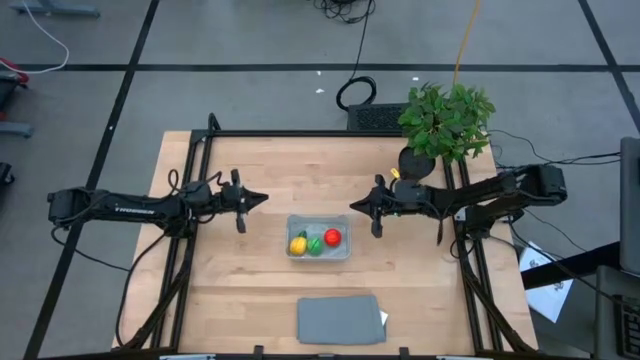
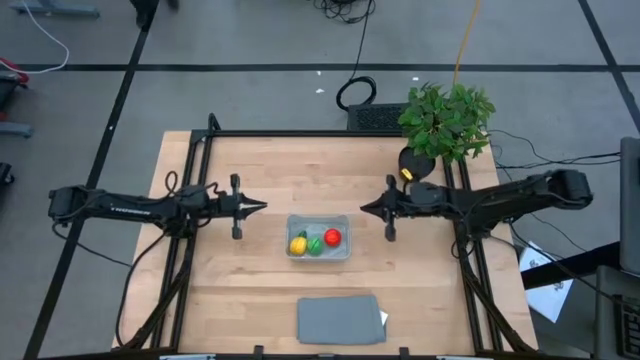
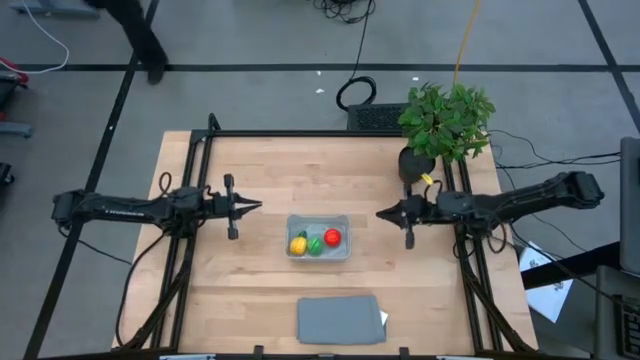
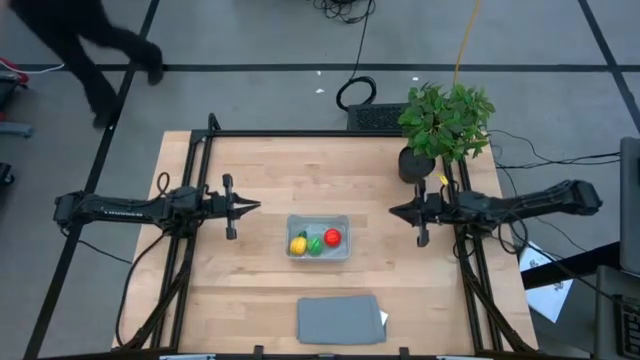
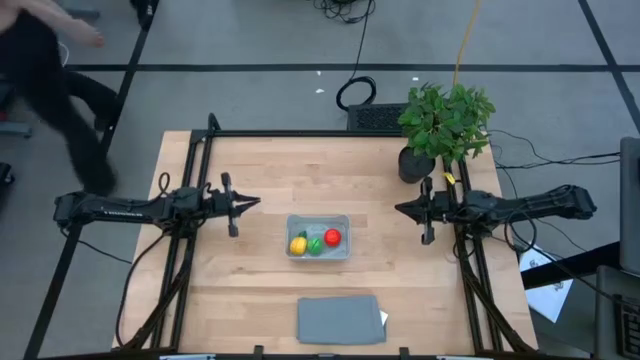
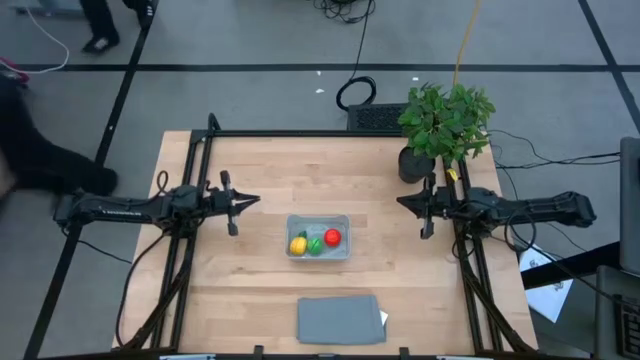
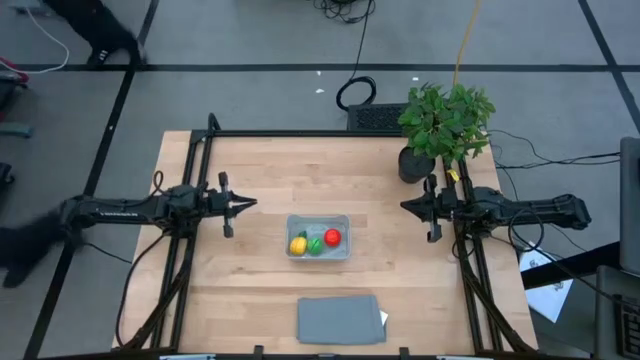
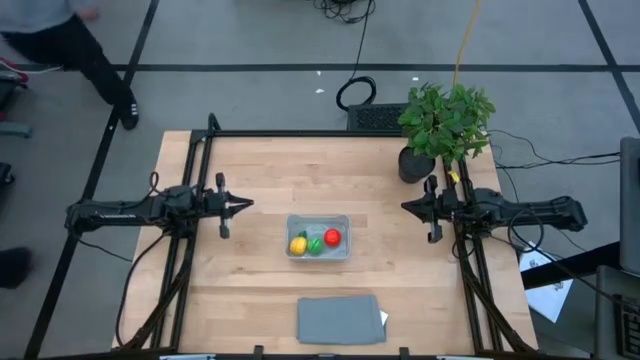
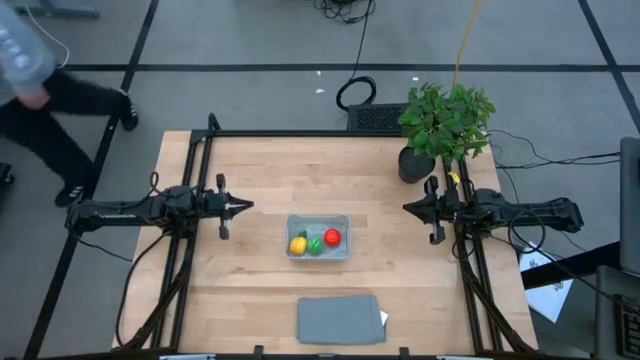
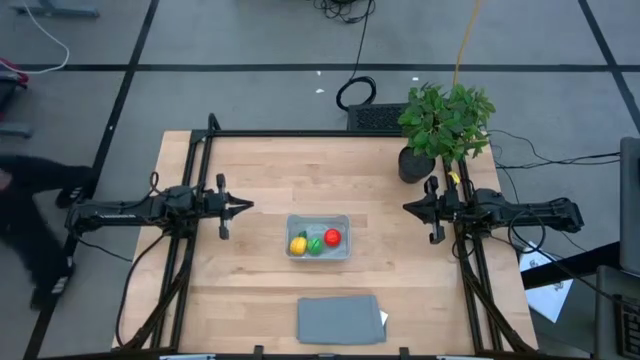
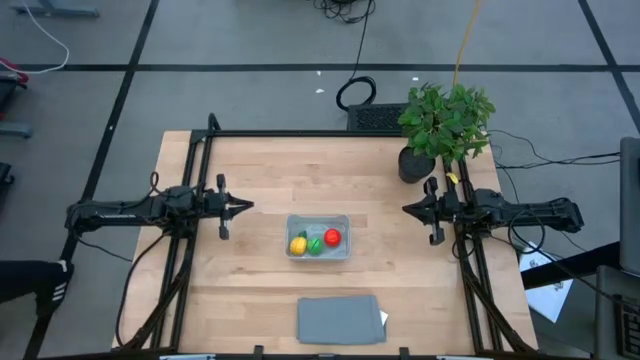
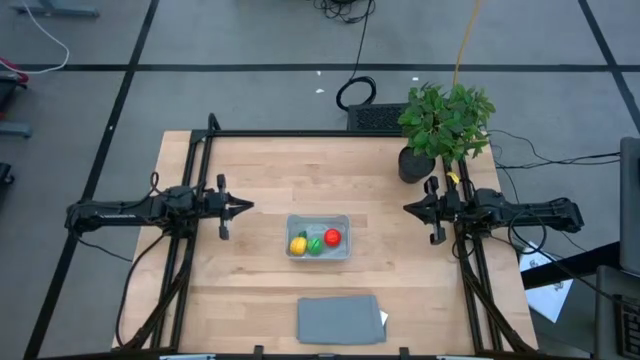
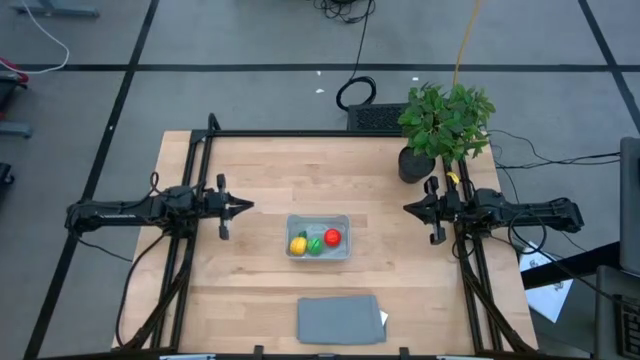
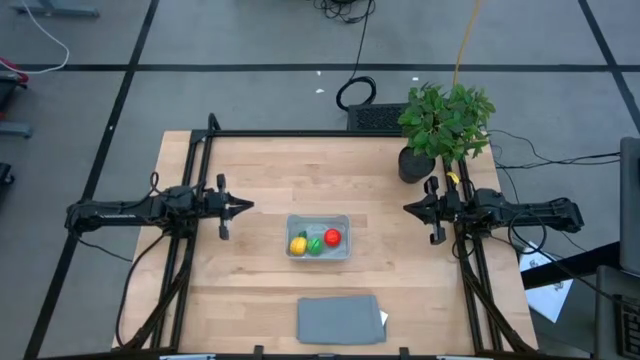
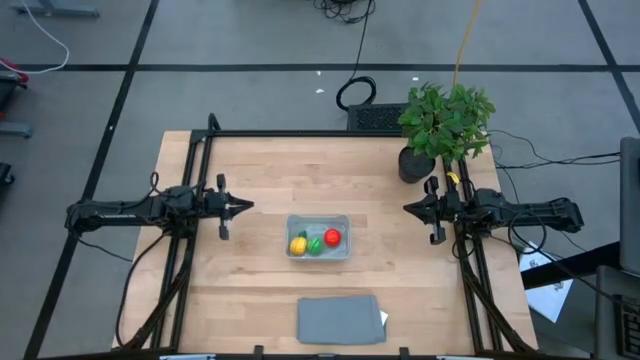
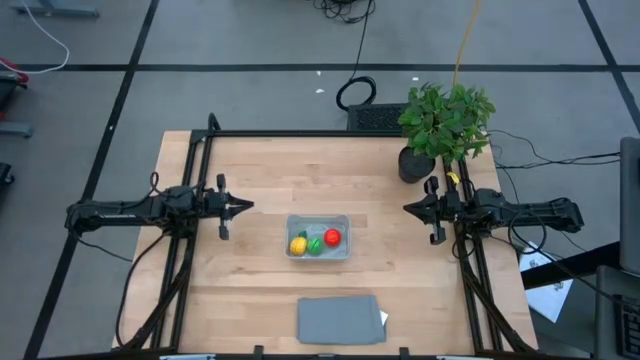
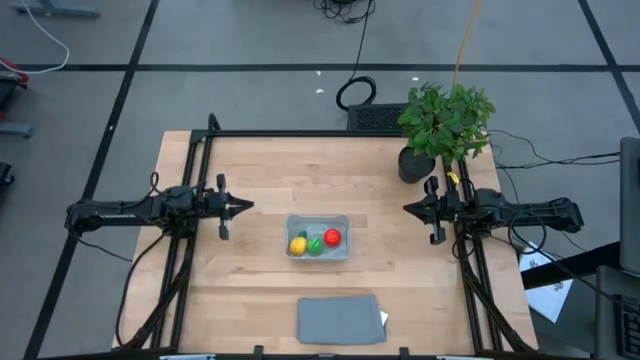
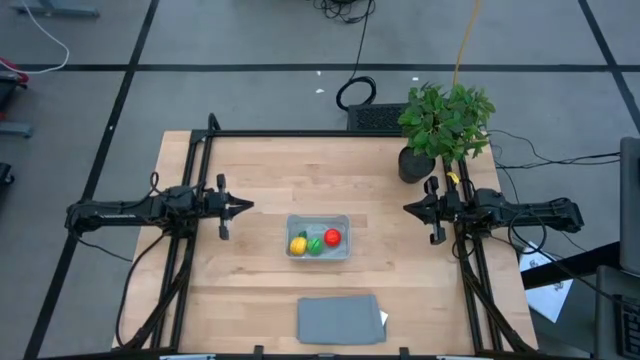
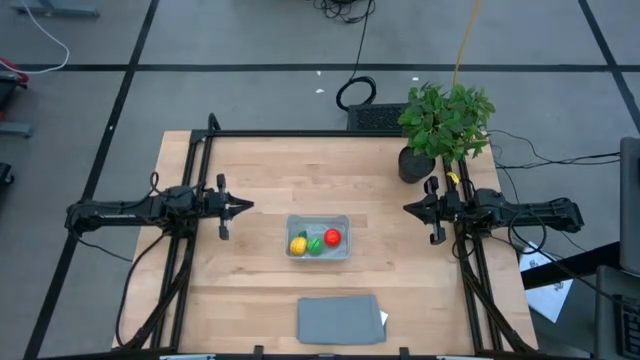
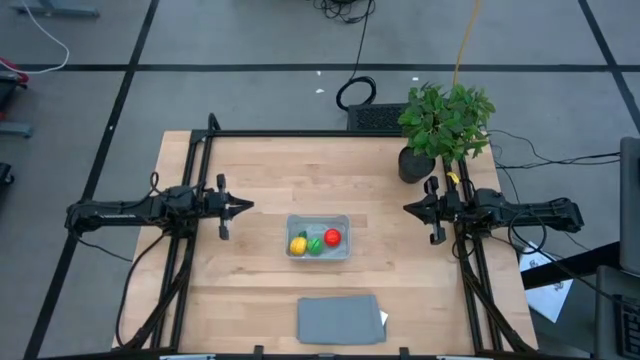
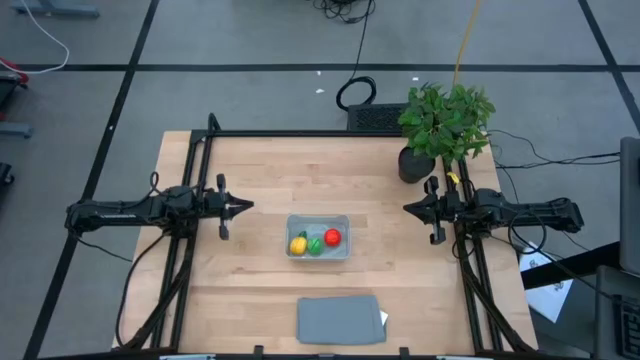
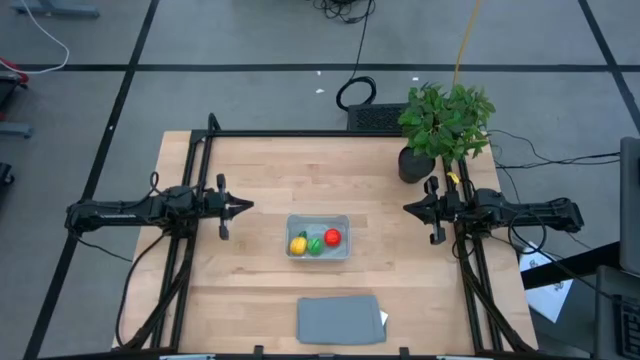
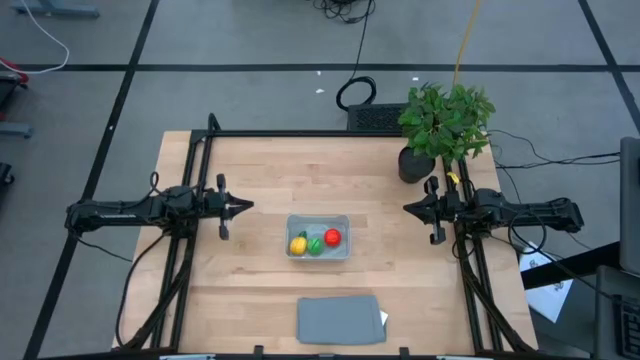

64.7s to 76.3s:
Task: Pick and placing Produce into tupperware
Return to Home Position

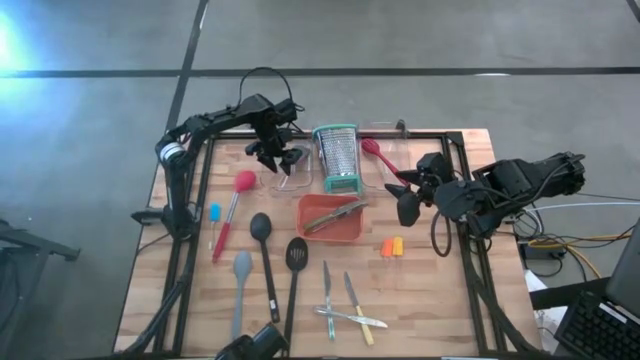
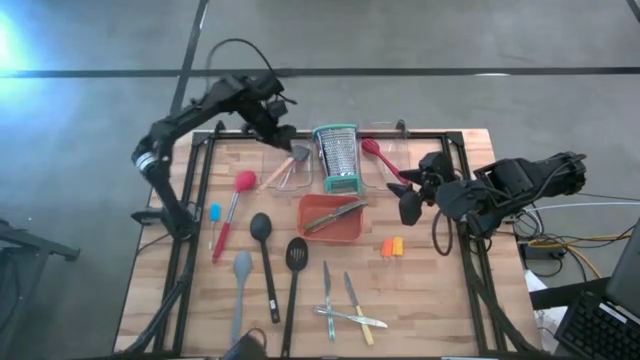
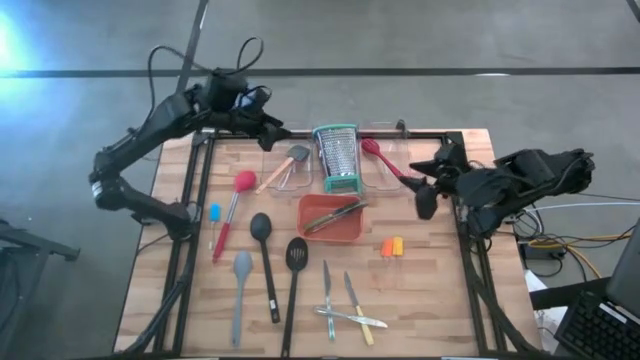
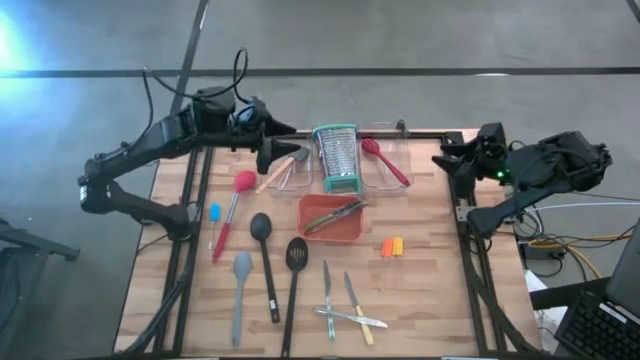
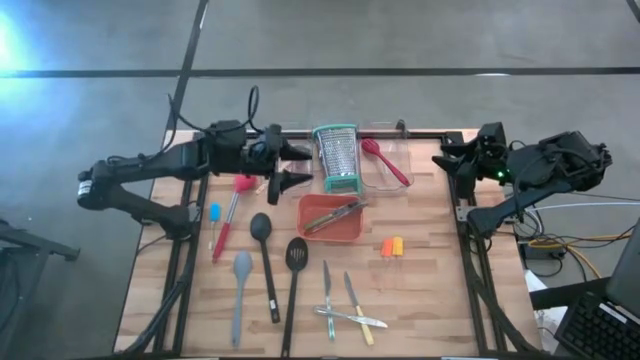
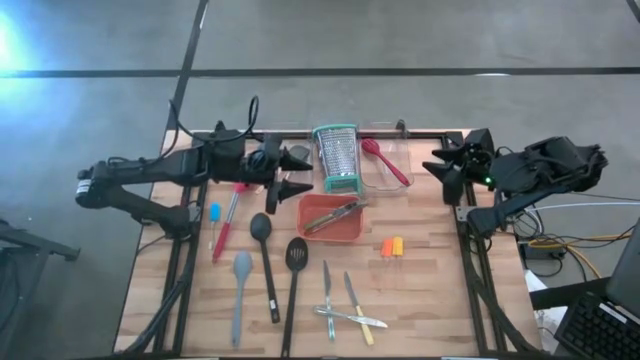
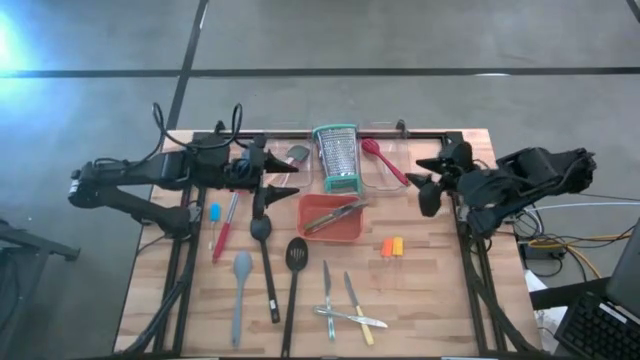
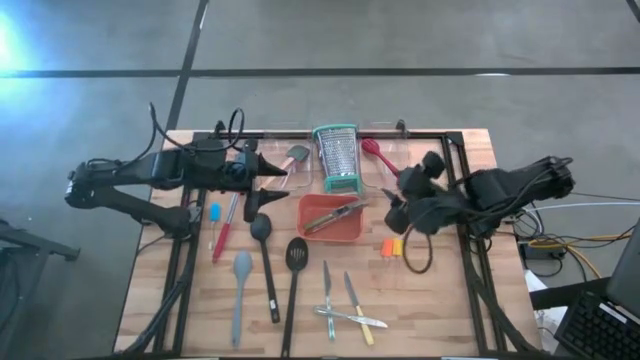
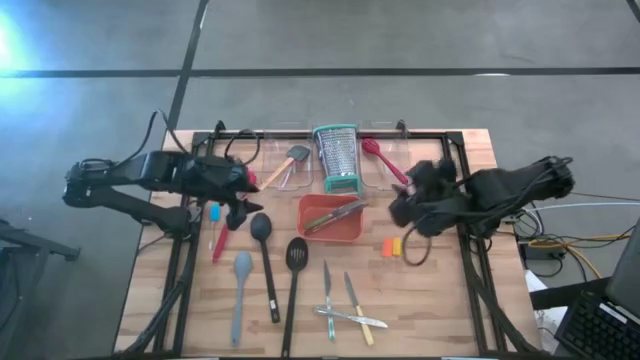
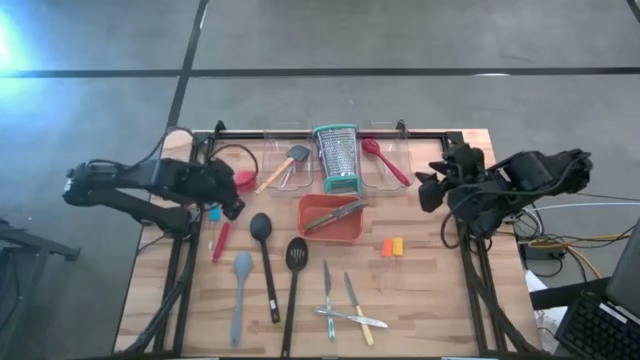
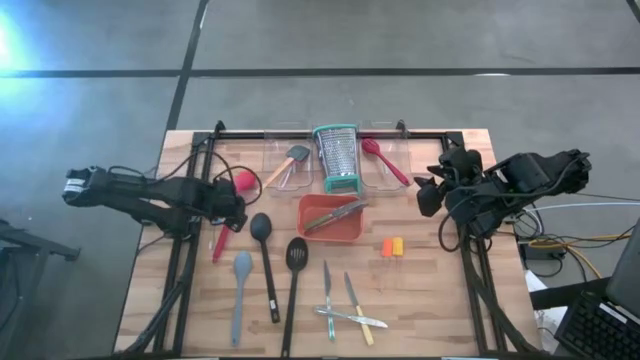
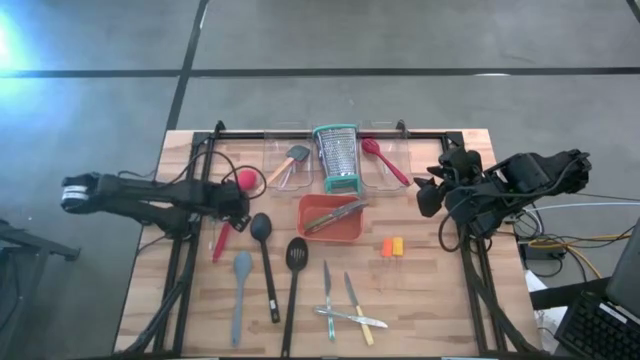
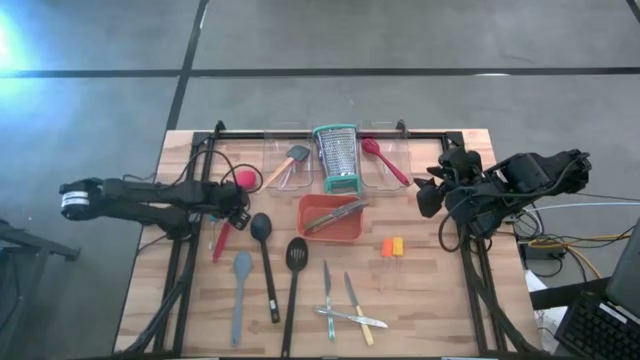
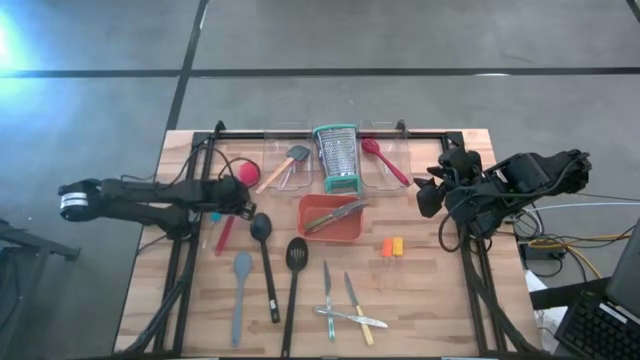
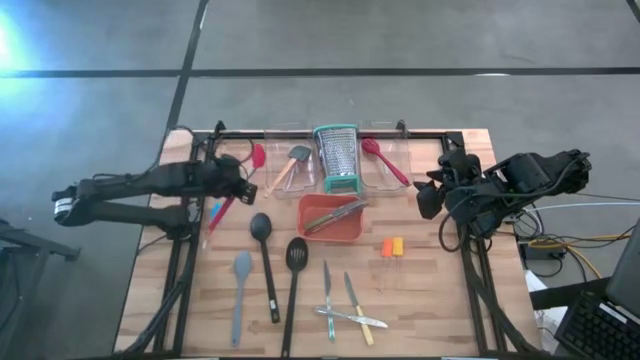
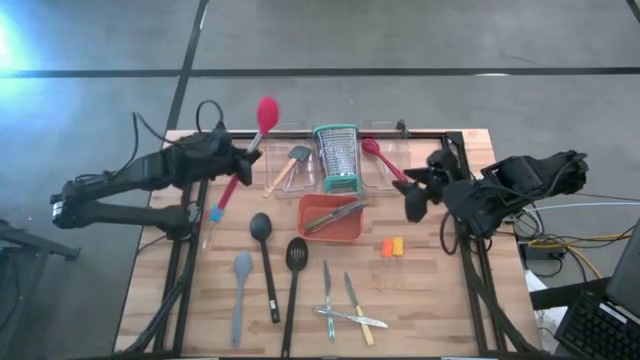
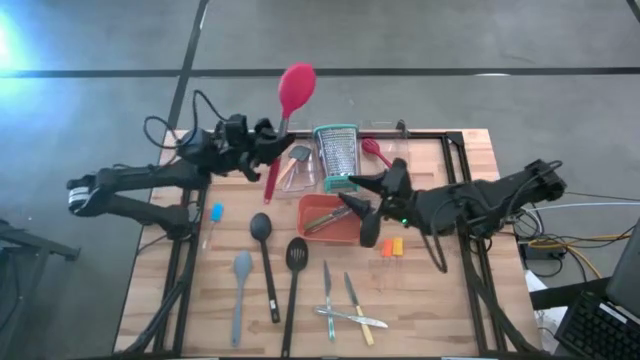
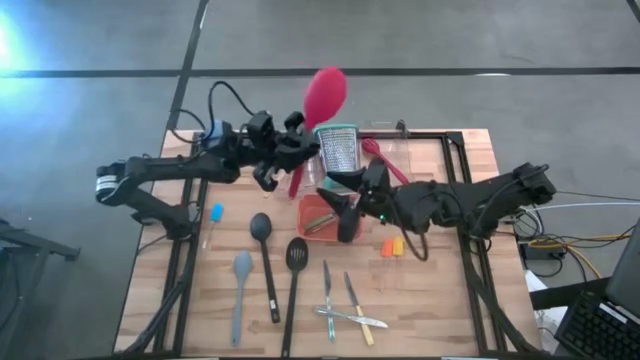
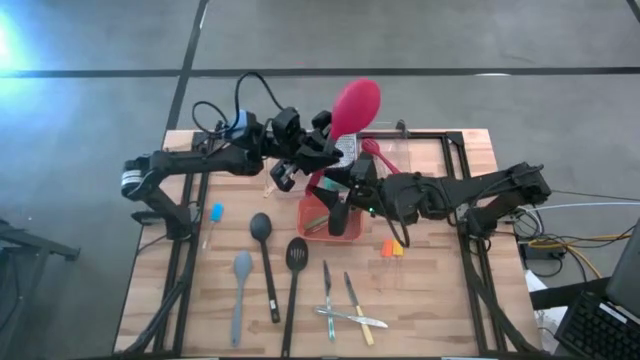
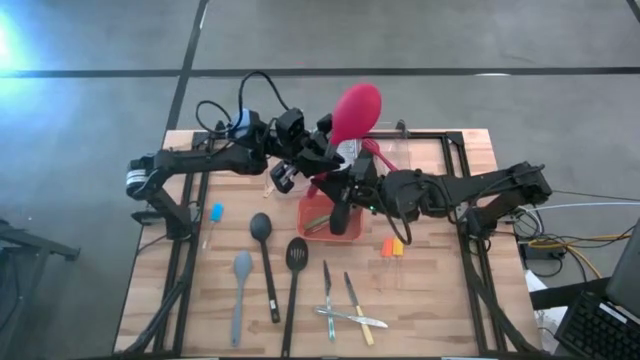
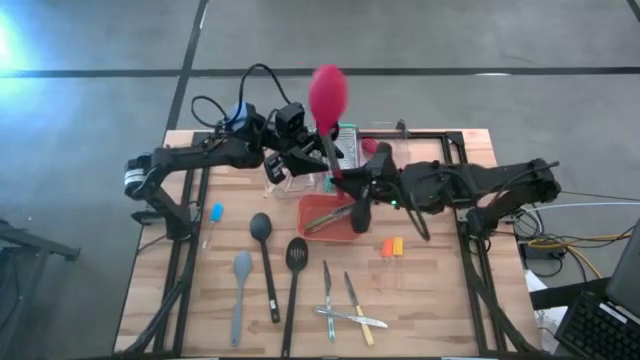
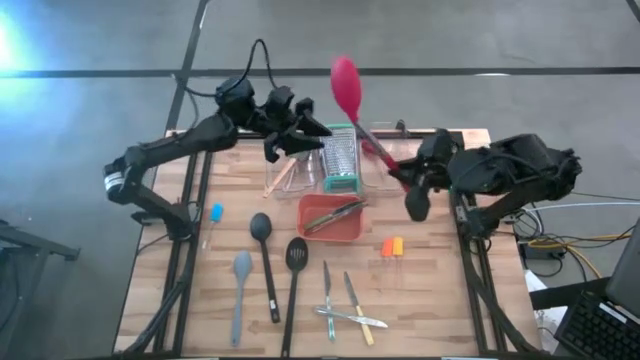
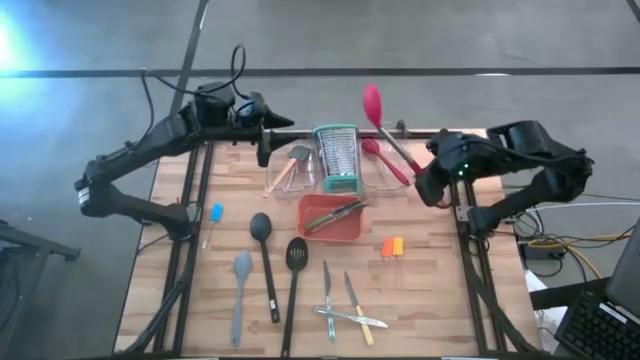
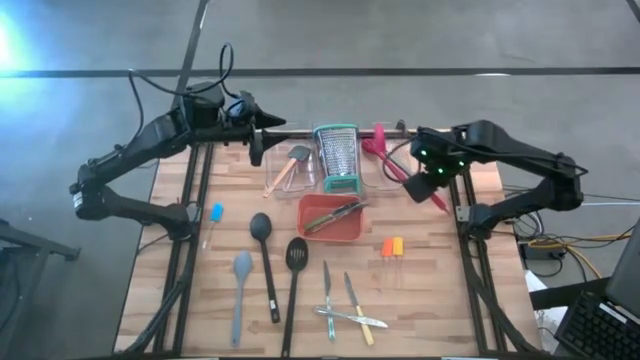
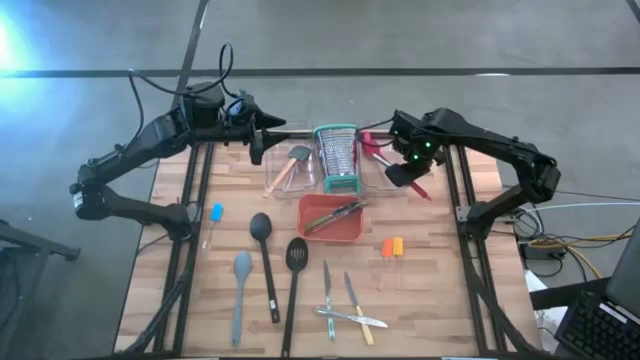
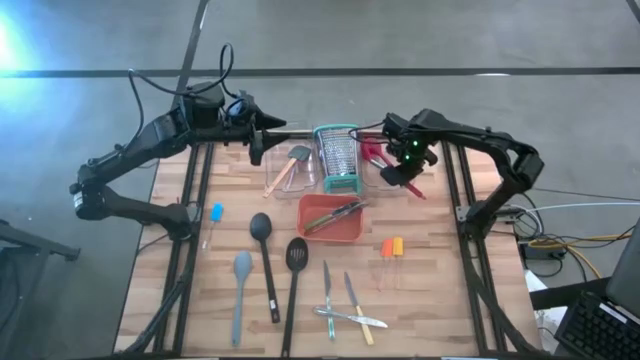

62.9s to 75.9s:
Task: Pick & Place Kitchen Items
Put the red serving spoon into the right transparent bin
